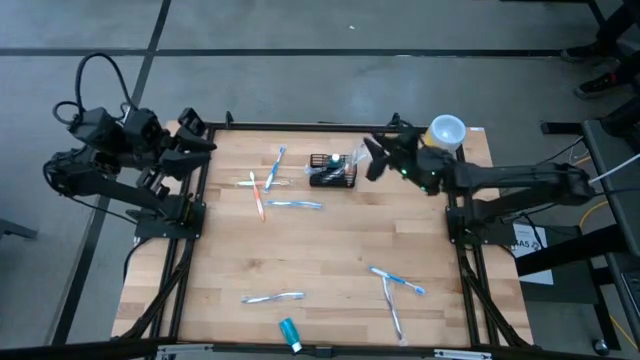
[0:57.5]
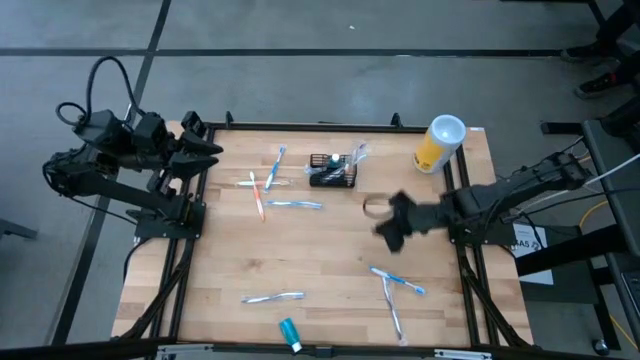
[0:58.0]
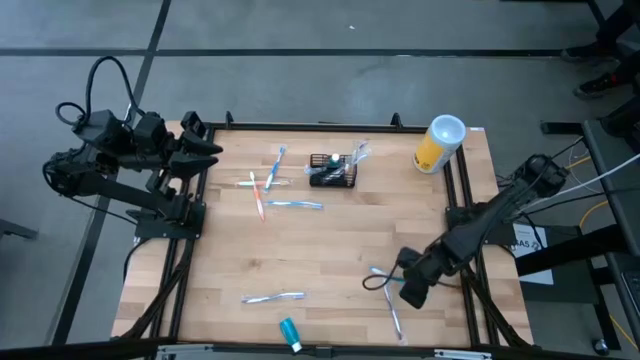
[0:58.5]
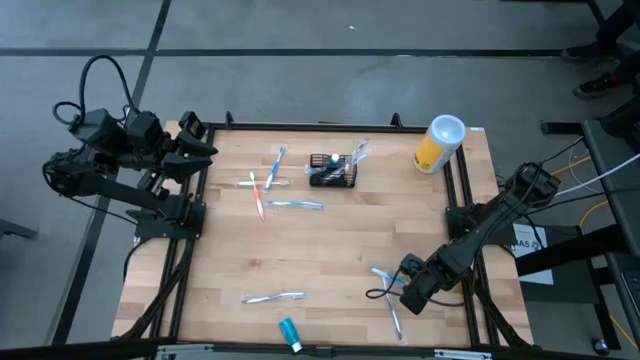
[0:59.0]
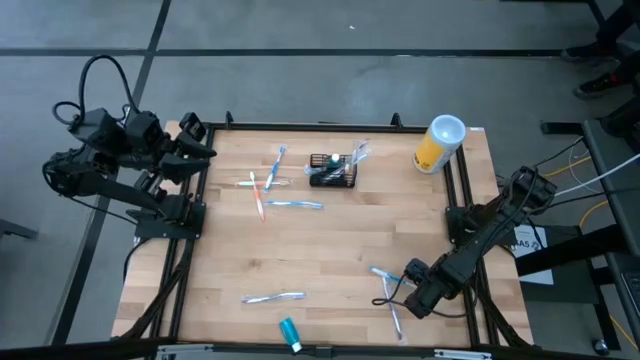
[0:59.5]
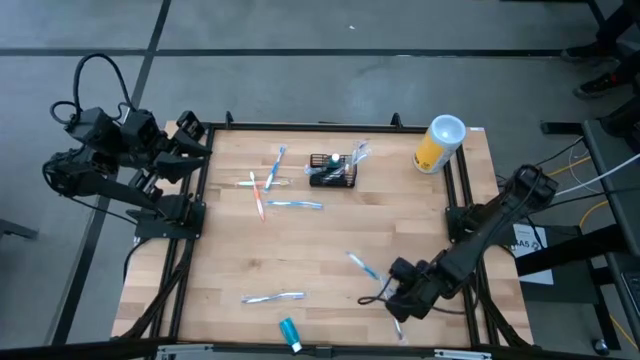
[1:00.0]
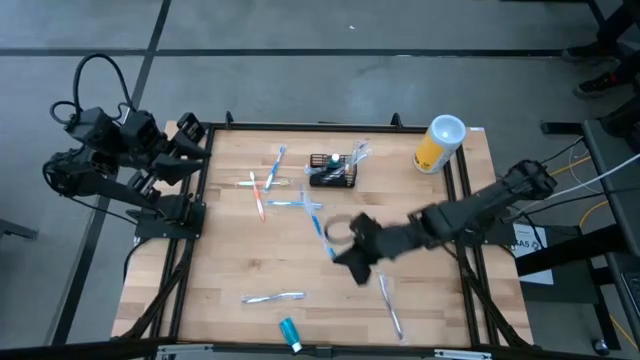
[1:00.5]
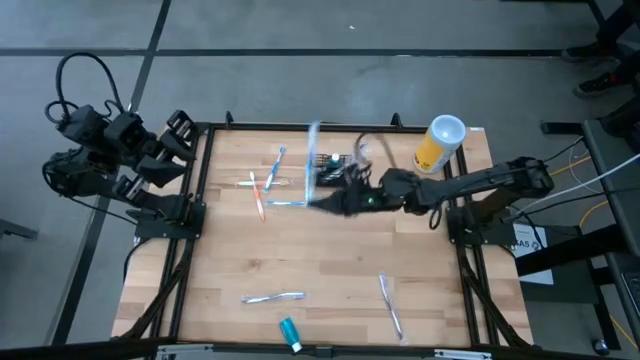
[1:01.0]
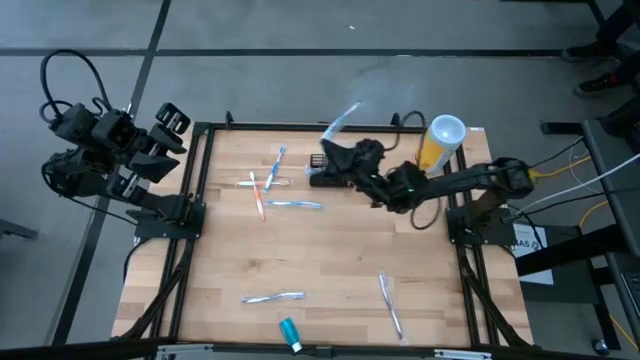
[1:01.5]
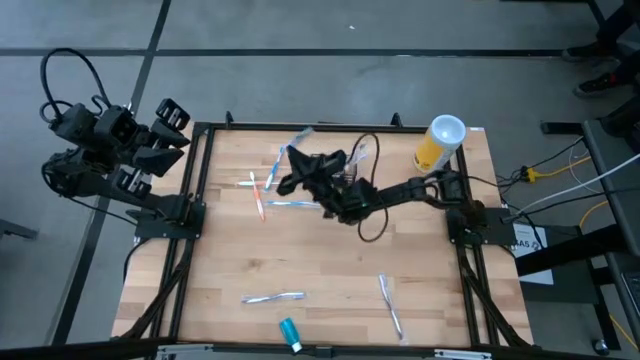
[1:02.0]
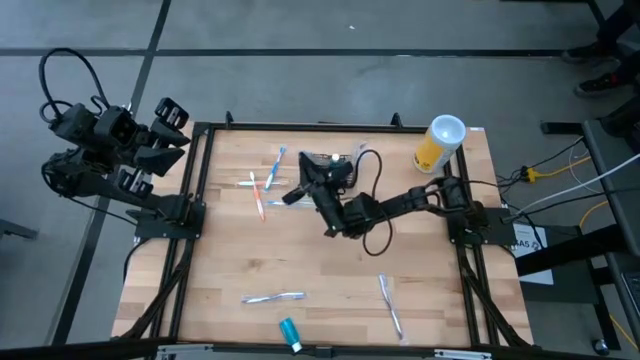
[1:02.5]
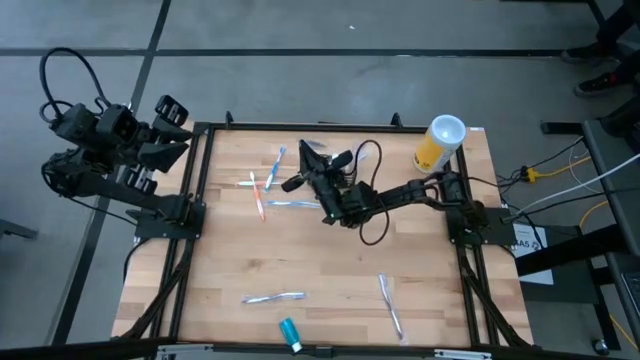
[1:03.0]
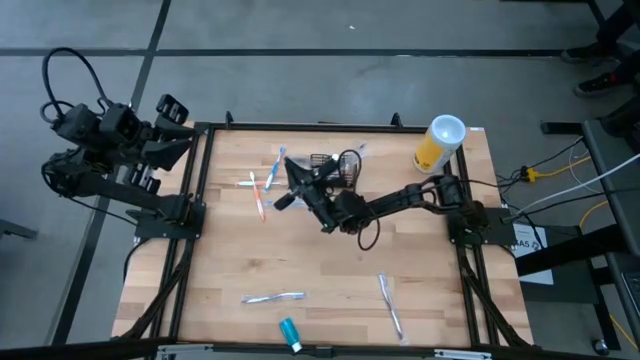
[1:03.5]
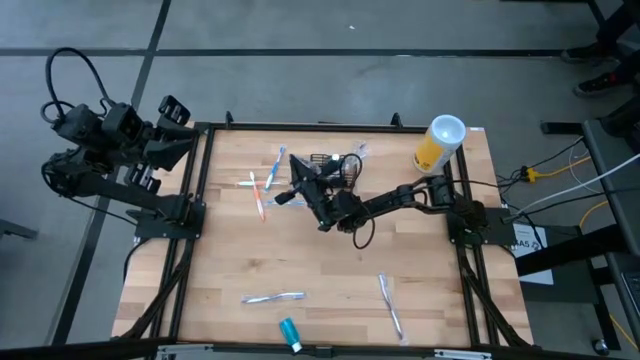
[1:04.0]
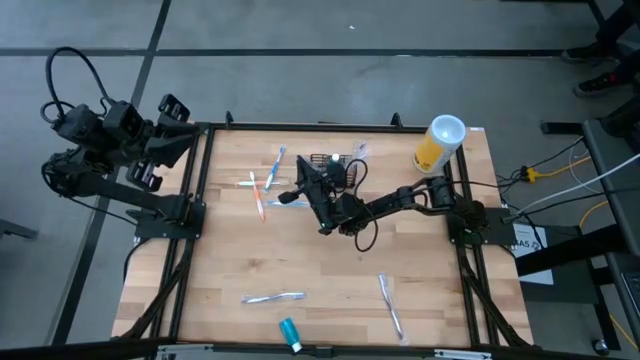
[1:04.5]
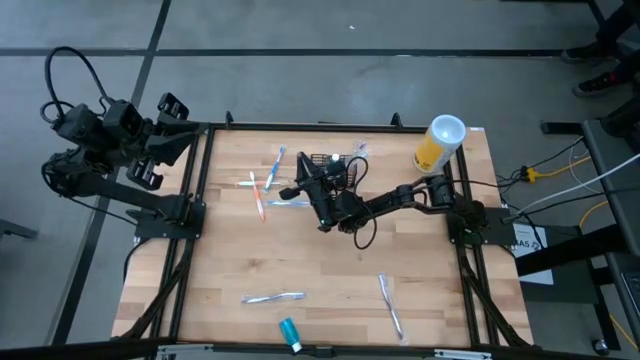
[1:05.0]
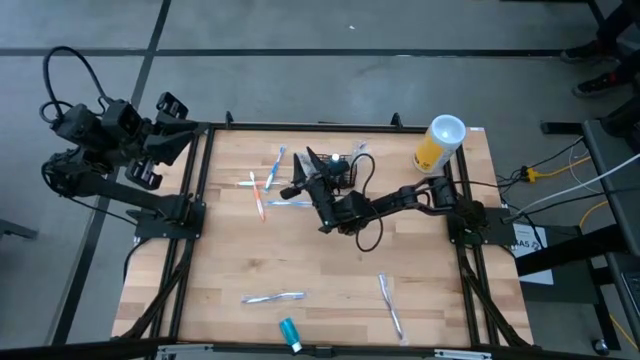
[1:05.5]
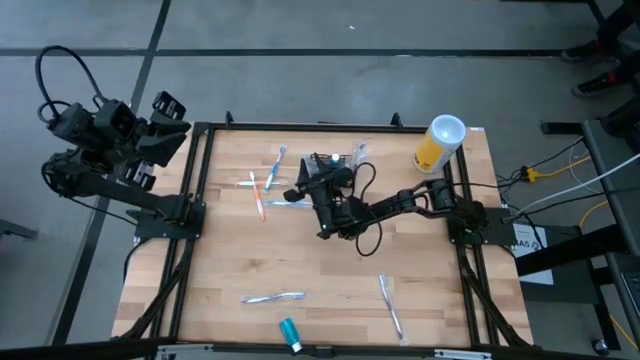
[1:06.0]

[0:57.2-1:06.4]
Task: Pick & Place toothbrushing station
Put the blue toothbrush into the black mesh organizer

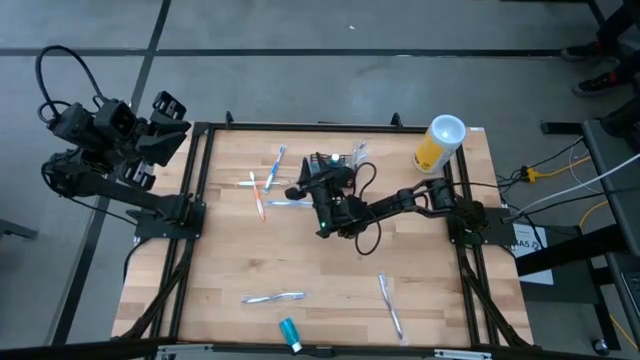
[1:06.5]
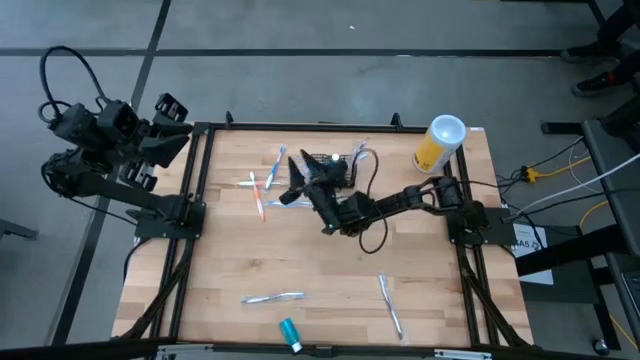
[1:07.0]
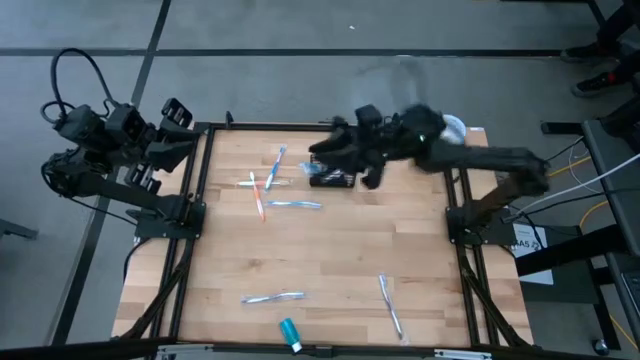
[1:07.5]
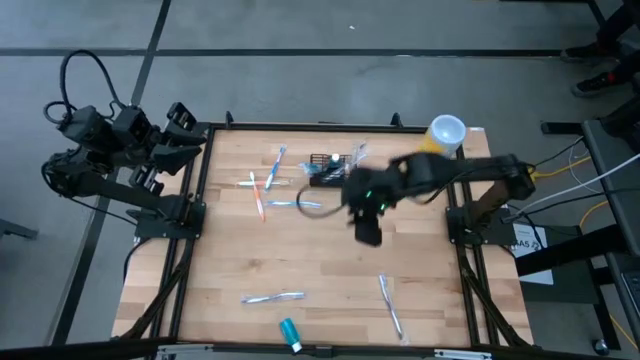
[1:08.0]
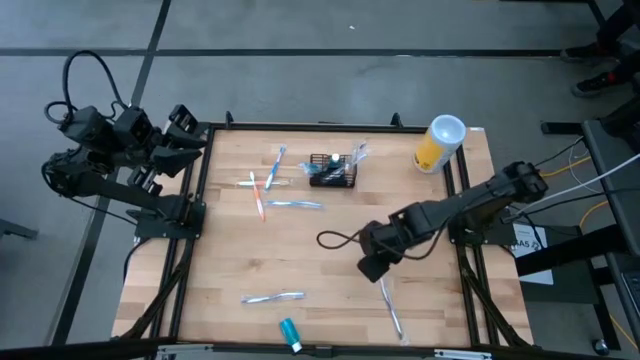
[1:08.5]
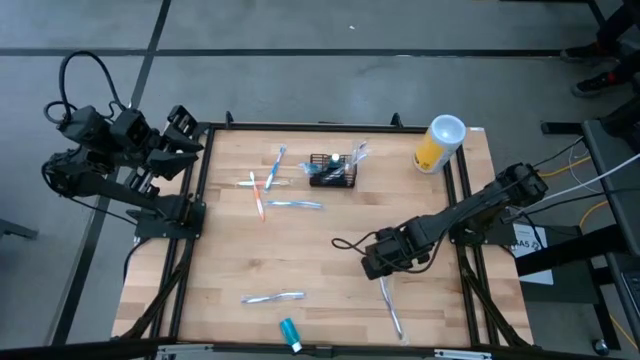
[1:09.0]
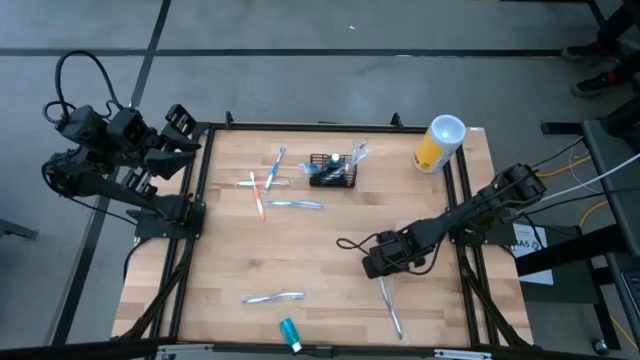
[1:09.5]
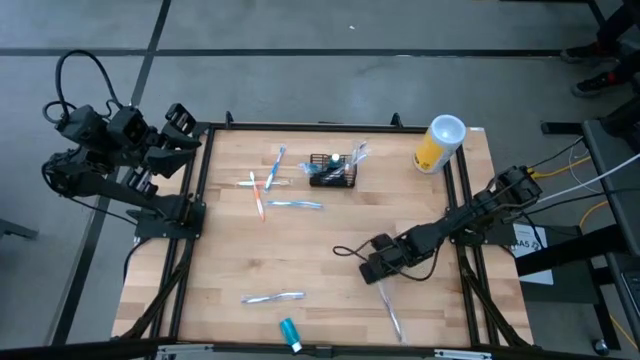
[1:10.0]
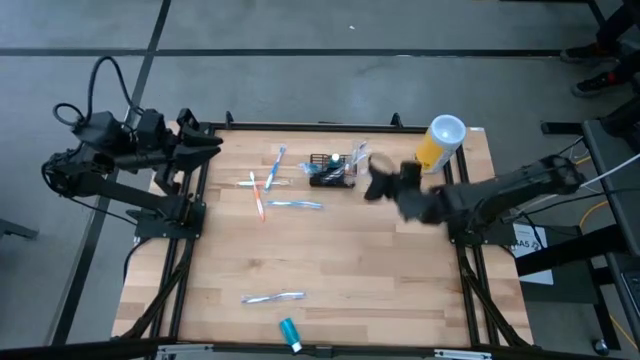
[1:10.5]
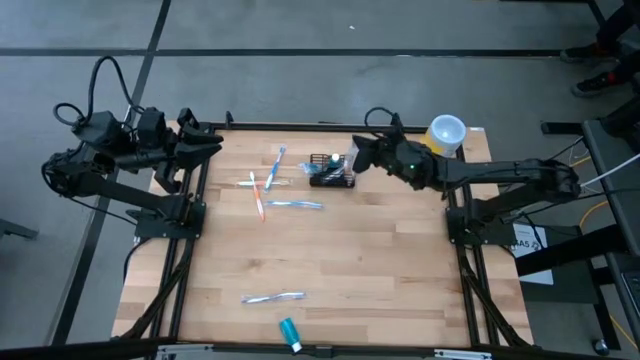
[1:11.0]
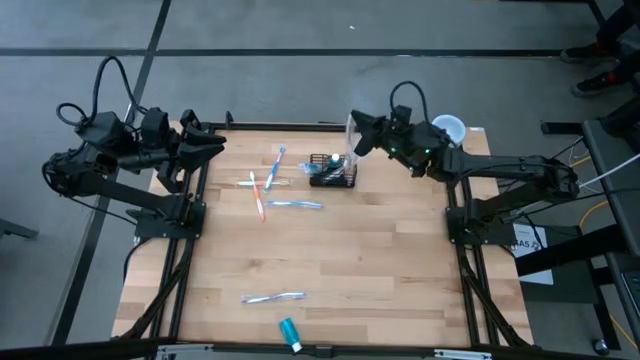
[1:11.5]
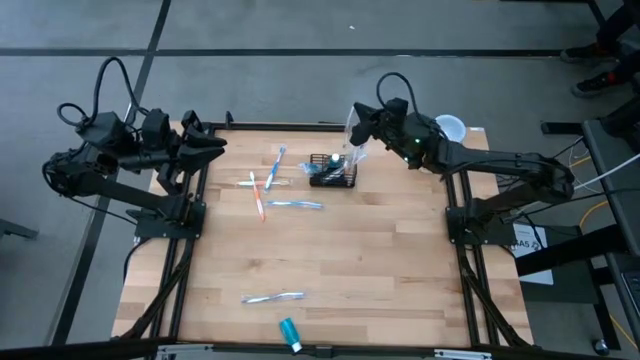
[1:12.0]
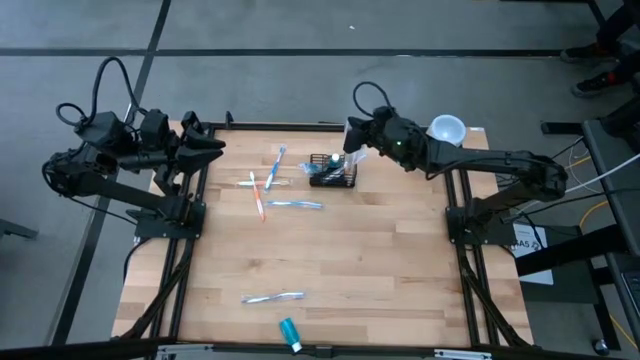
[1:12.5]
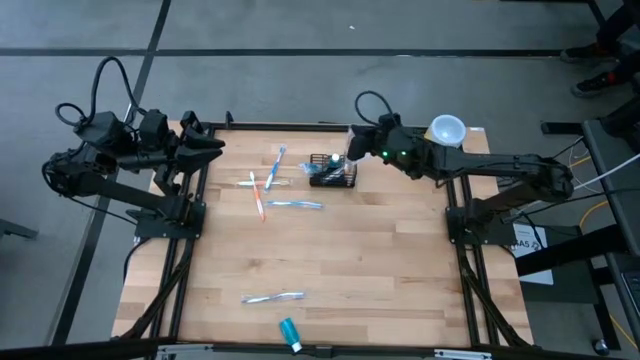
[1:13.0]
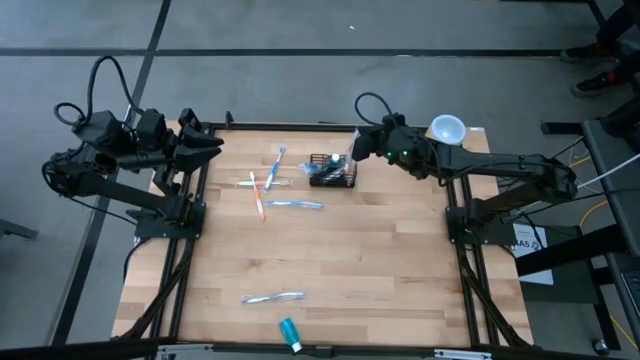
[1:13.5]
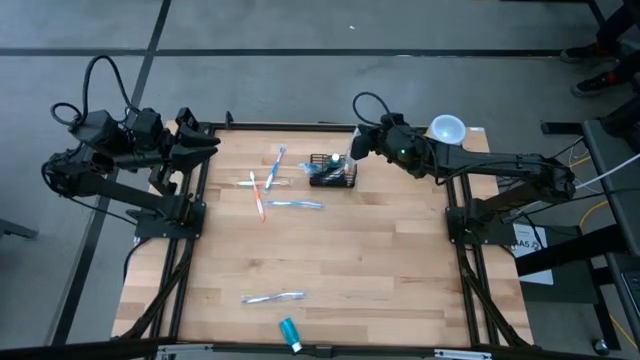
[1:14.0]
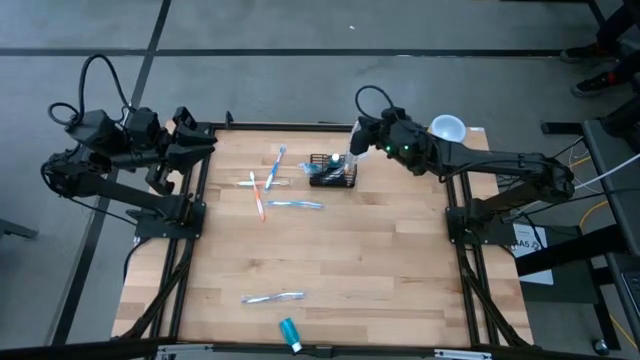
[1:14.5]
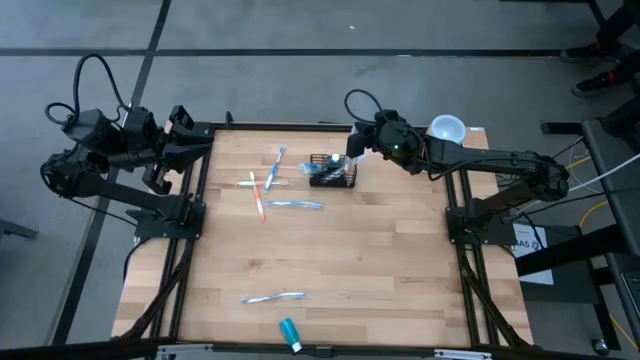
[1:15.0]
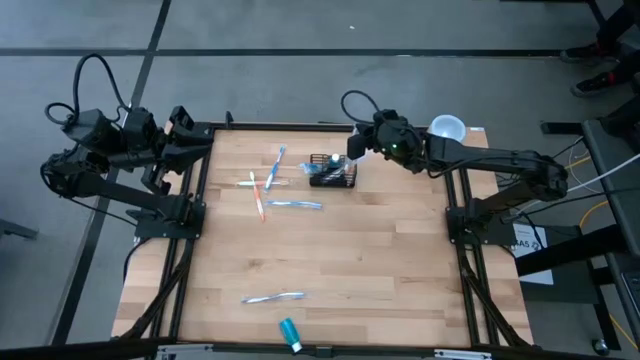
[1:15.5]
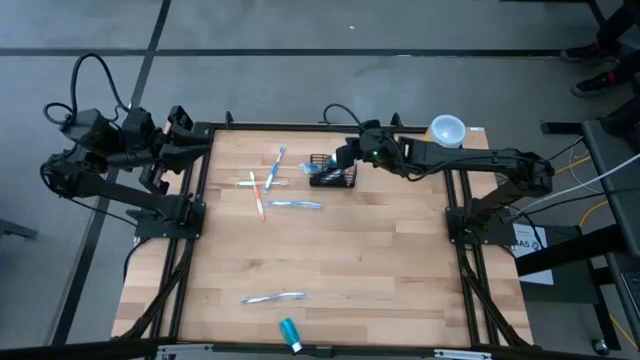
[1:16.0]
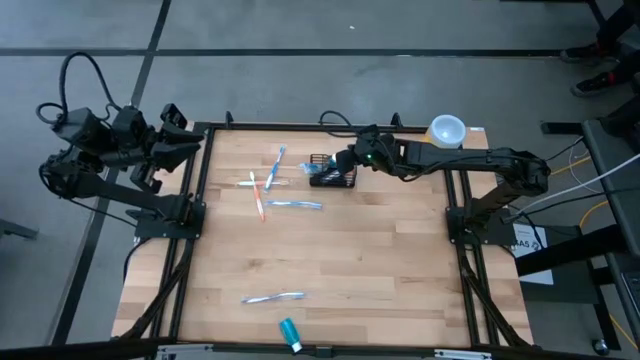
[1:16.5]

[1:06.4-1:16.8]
Put the purple toothbrush into the black mesh organizer

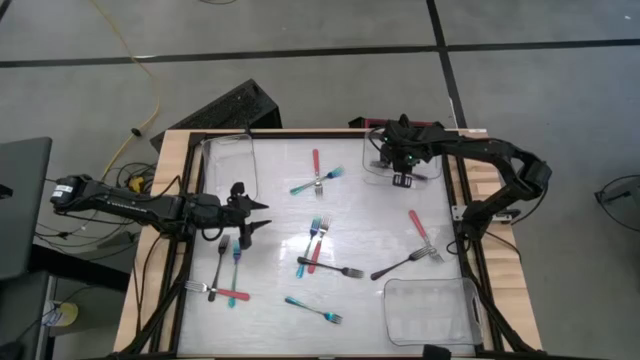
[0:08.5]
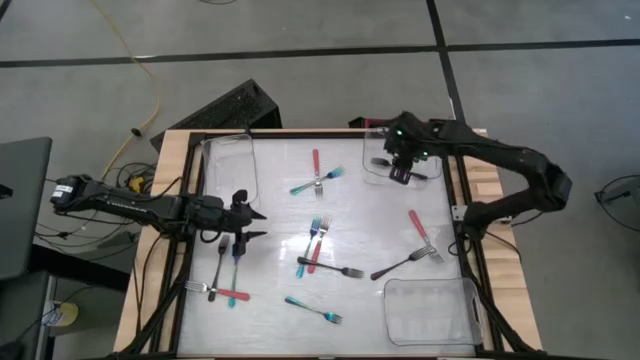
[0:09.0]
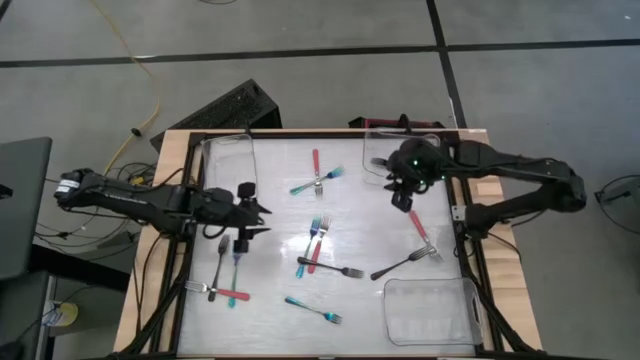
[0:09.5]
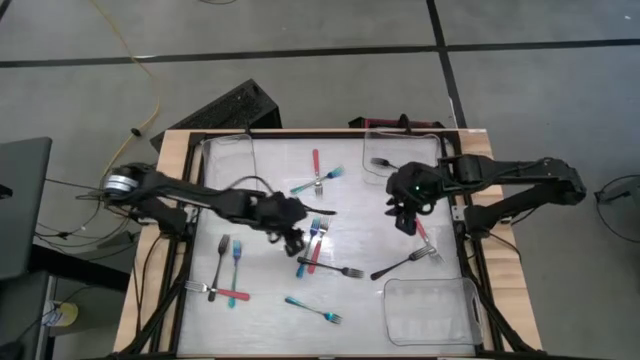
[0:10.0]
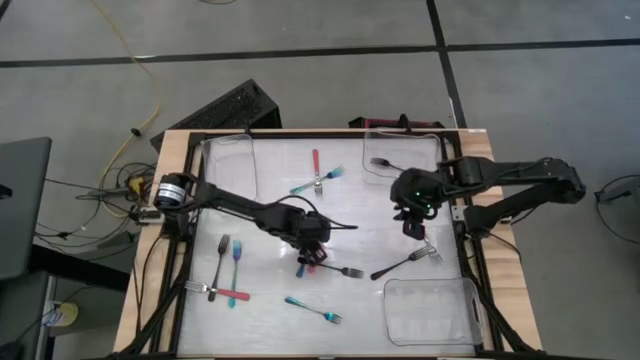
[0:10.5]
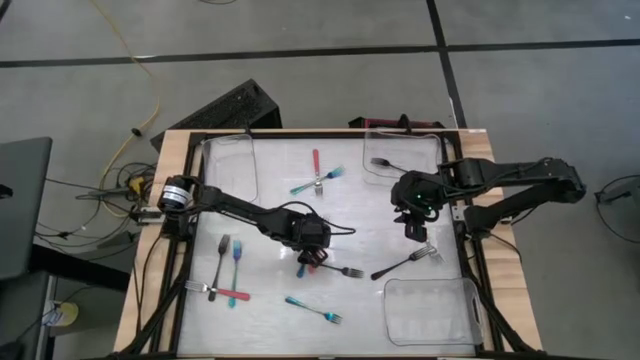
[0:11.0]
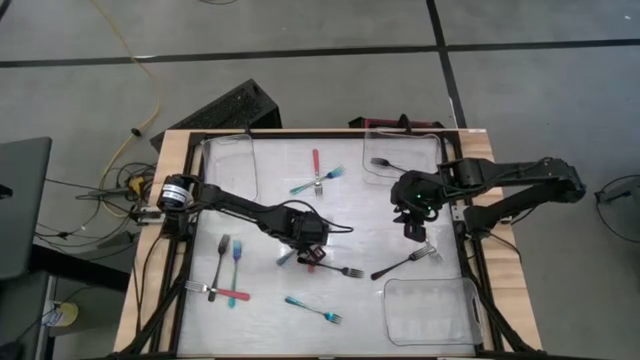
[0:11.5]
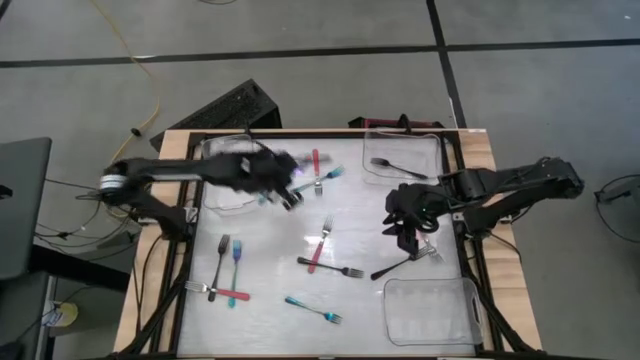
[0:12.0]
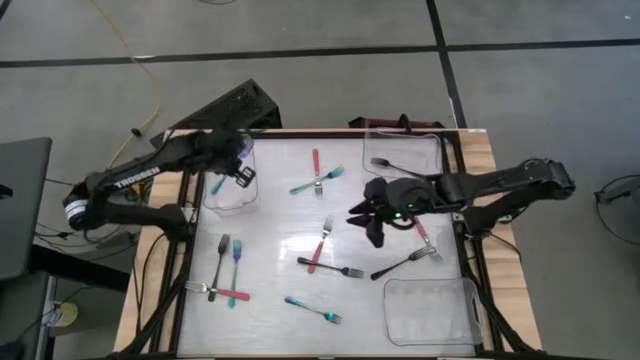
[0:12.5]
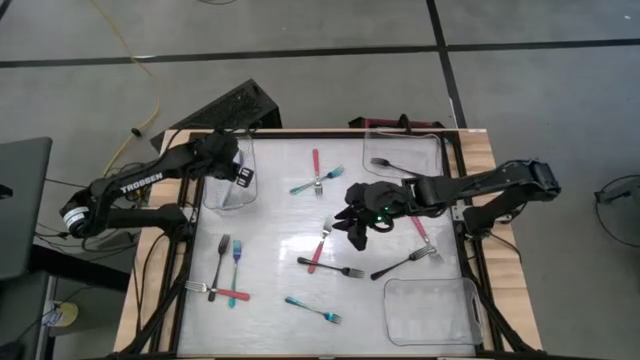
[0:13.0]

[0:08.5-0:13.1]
Task: Sort silverware by color (type)
Put the blue fork into the left transparent bin
